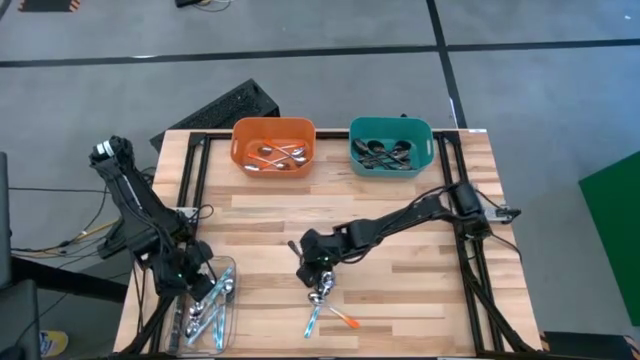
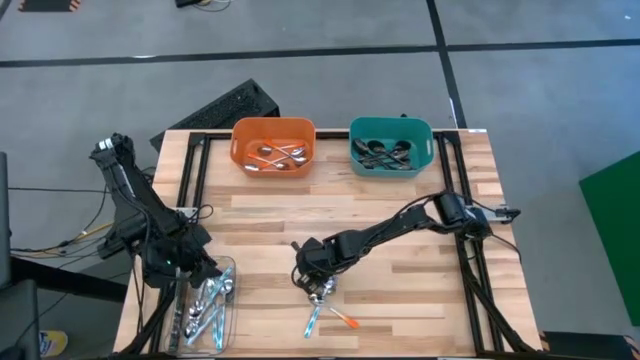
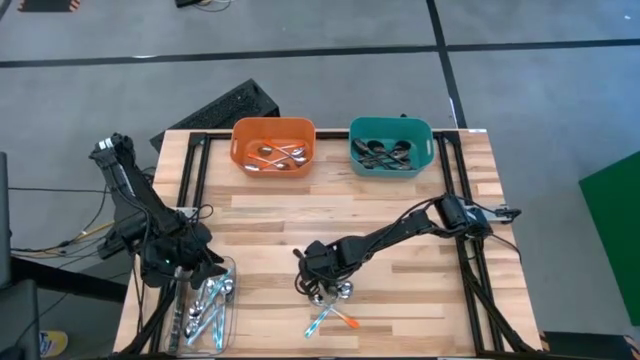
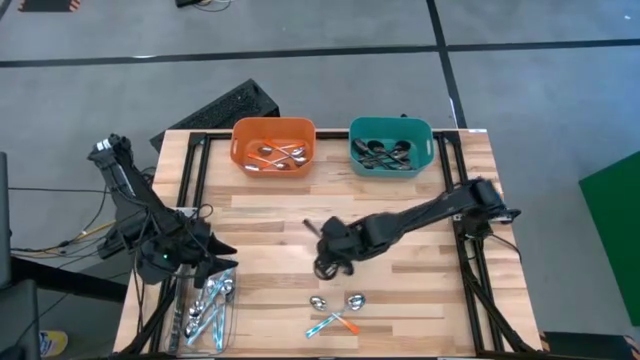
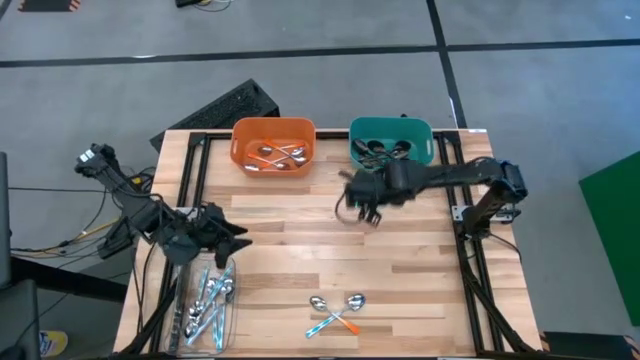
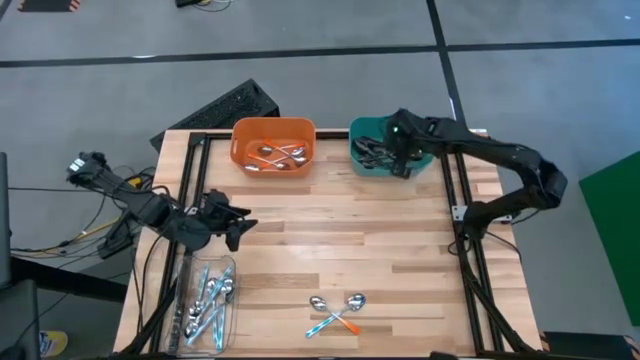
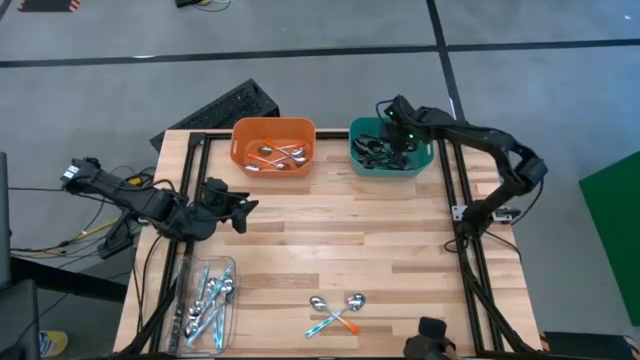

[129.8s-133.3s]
Task: Sort silverware by color (type)
Put the black spoon into the blue bin

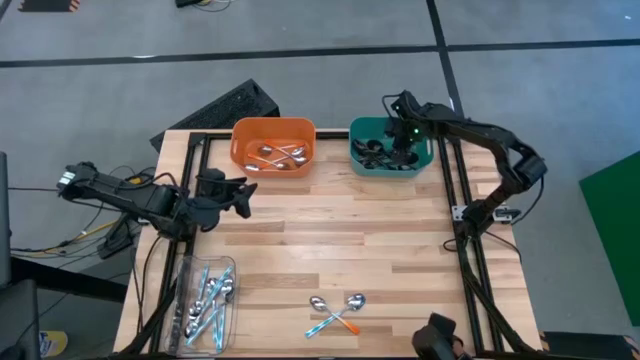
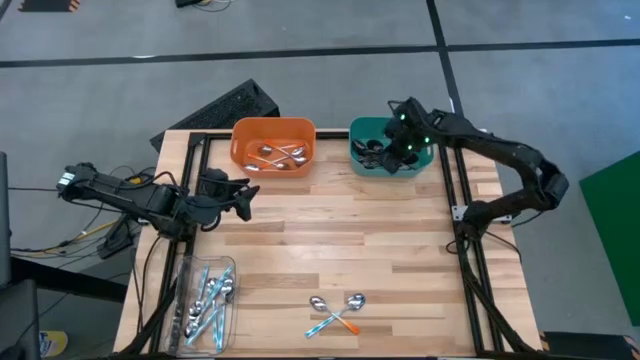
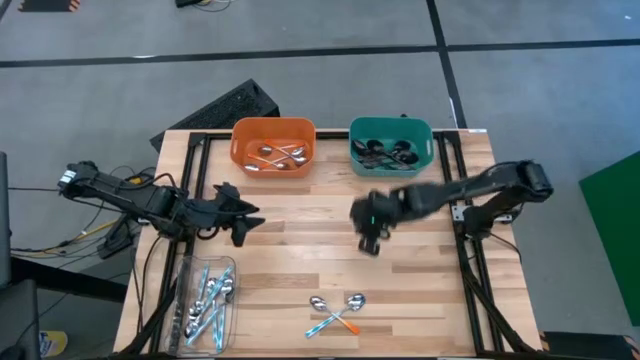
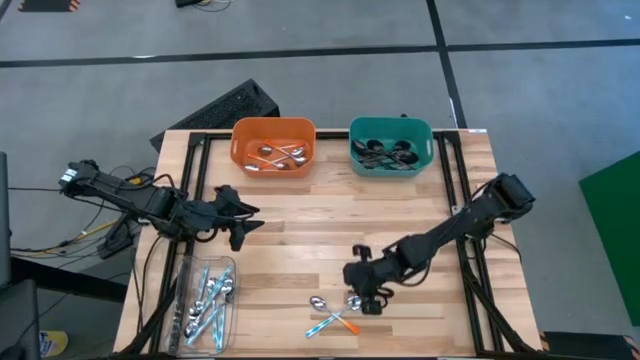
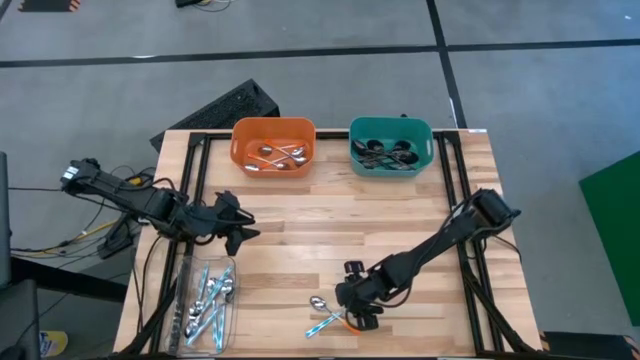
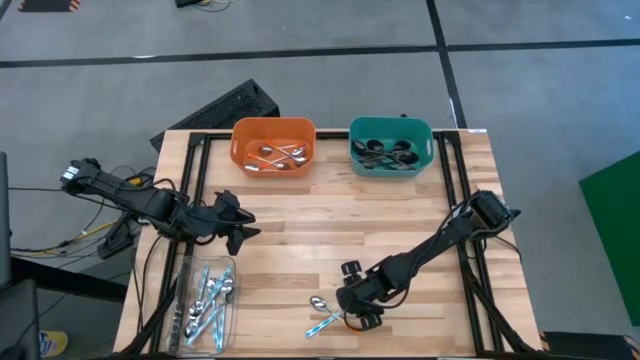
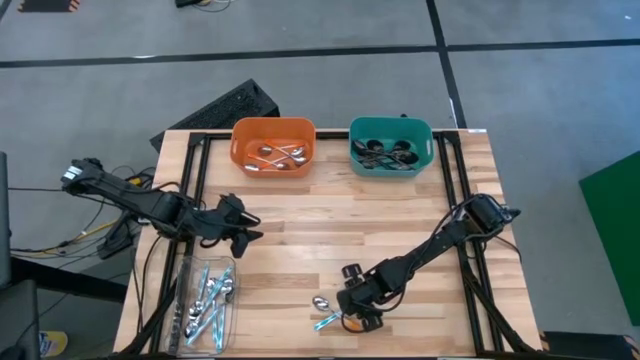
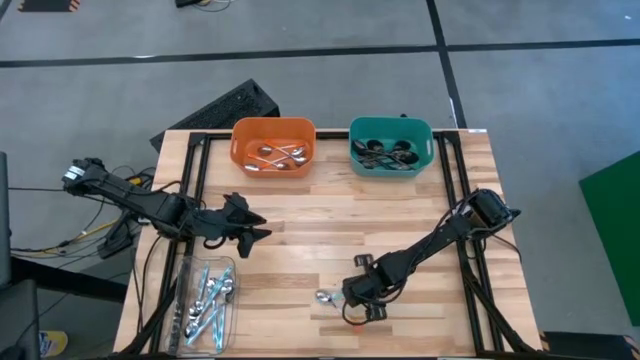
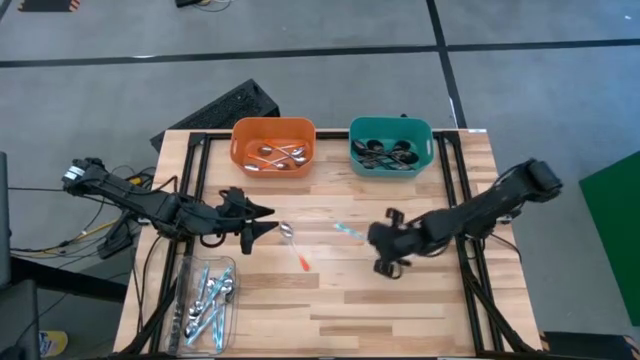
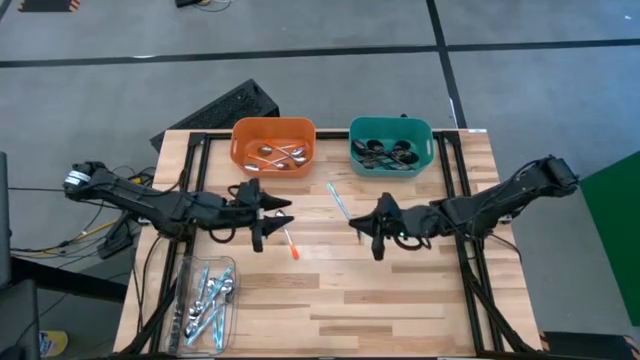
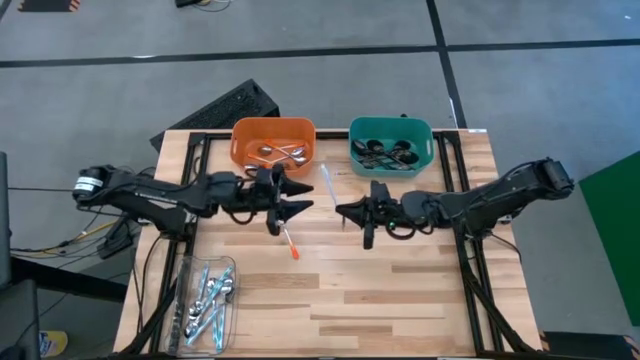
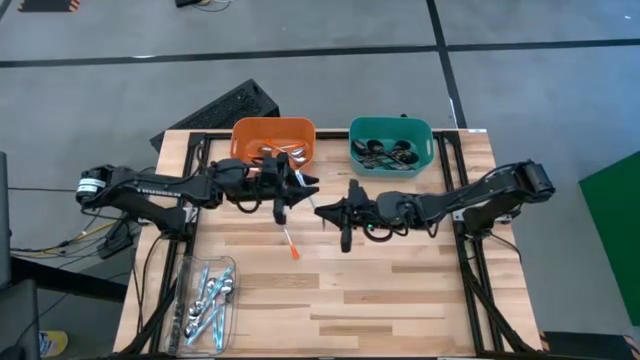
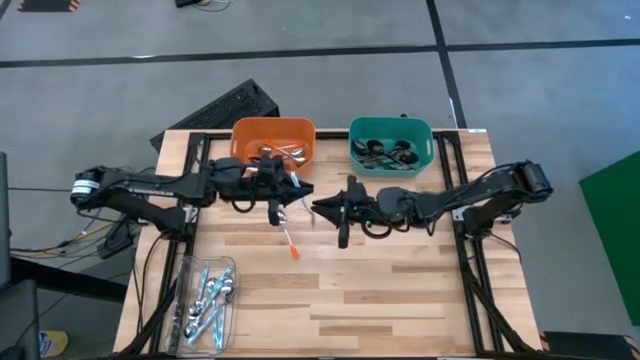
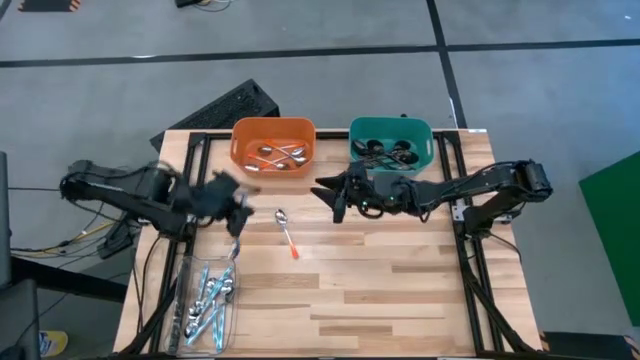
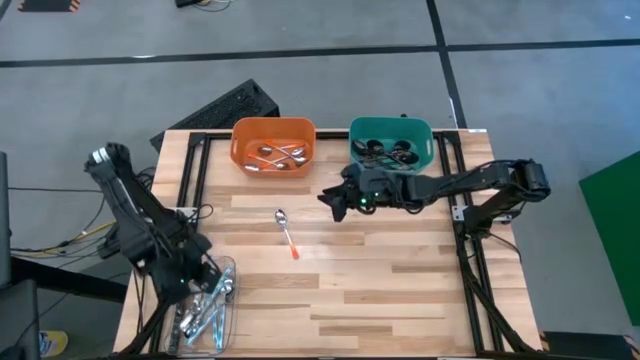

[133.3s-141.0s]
Put the green spoon into the transparent bin

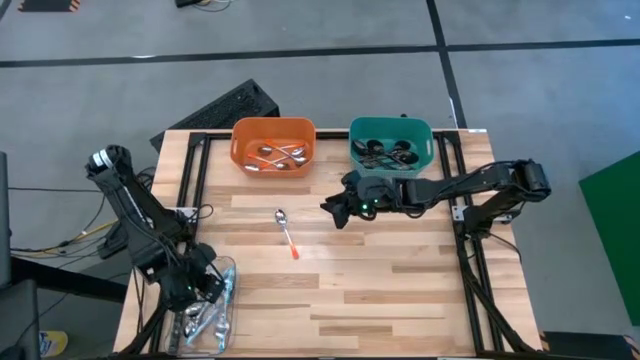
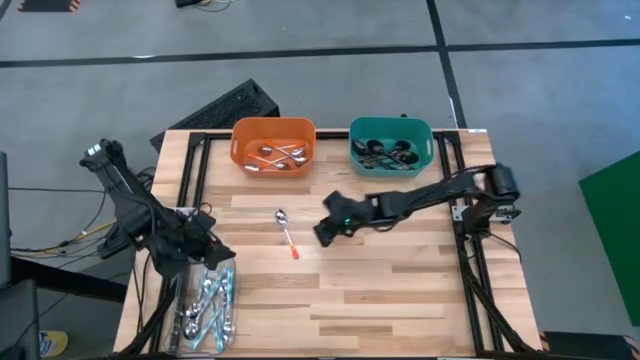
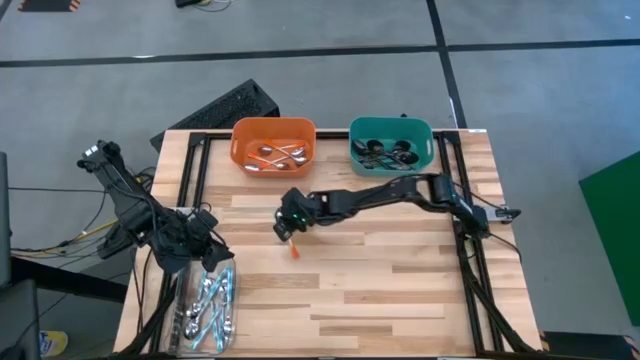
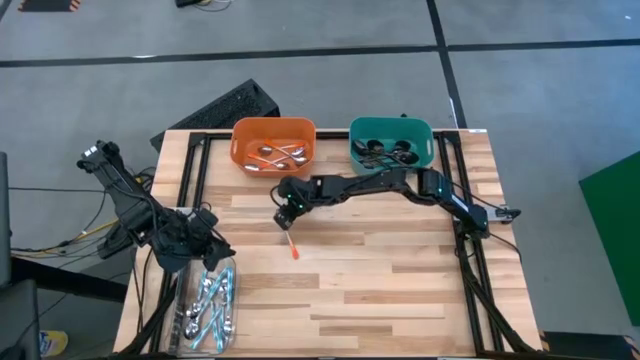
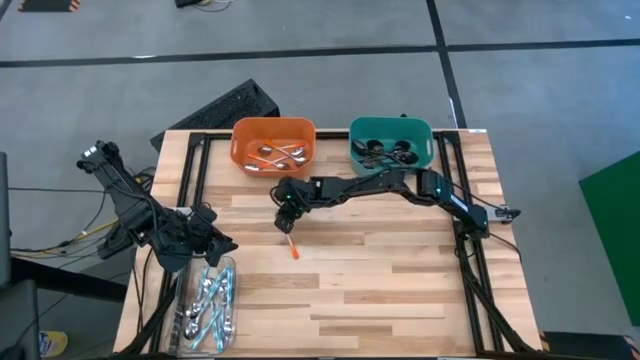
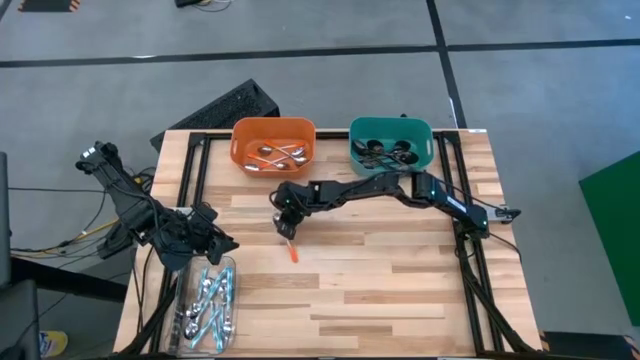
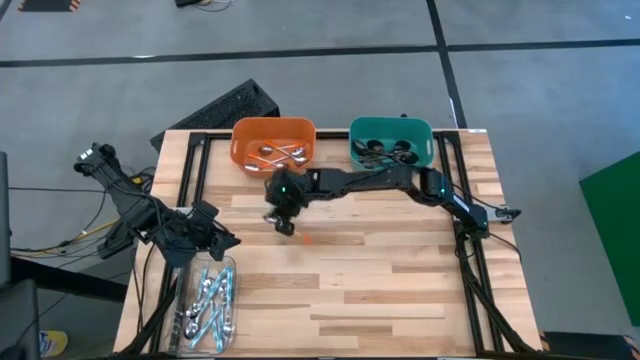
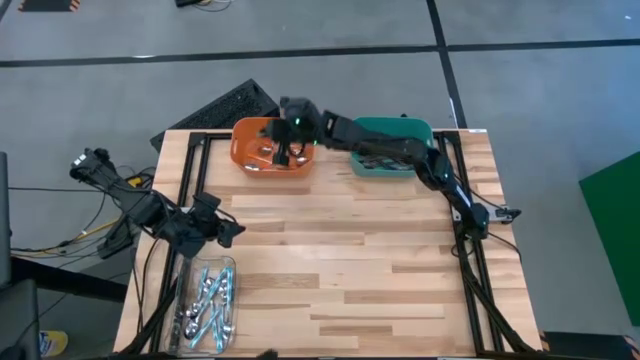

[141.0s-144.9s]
Put the orange spoon into the orange bin

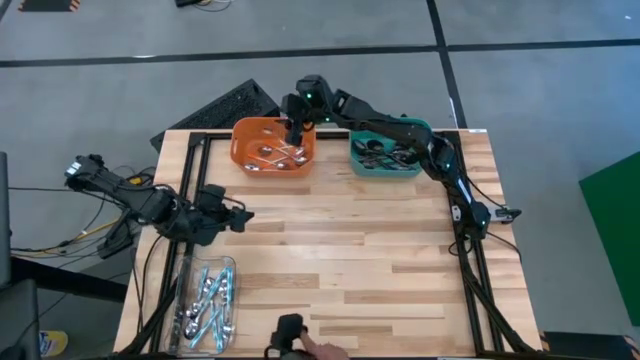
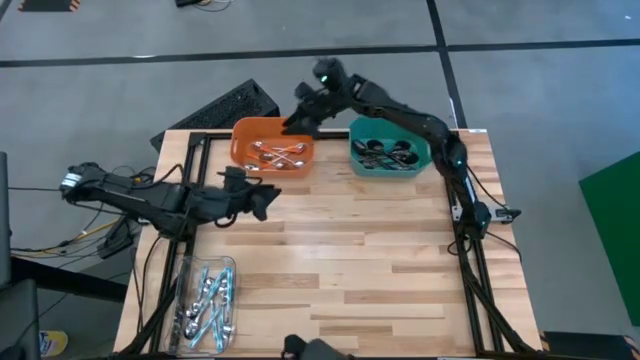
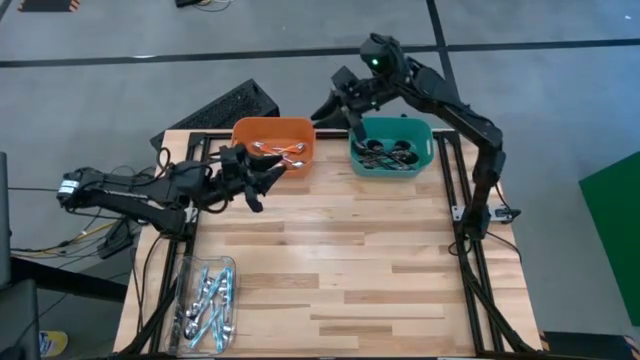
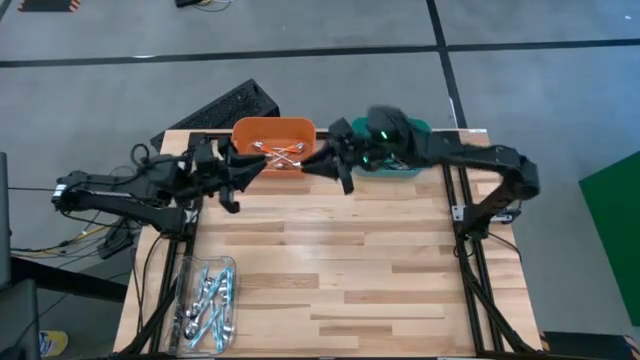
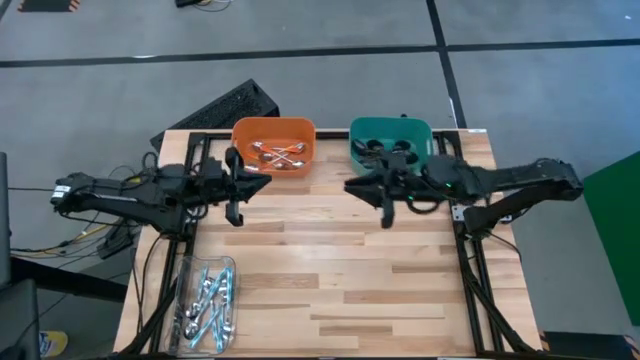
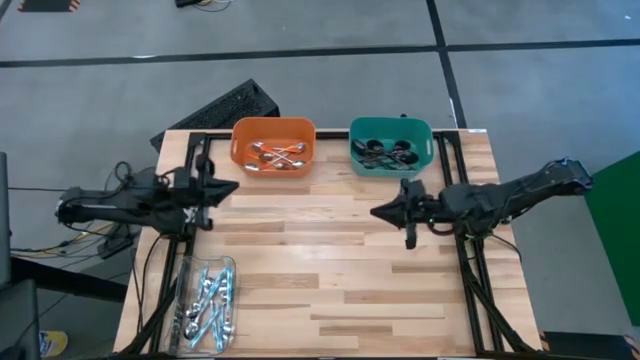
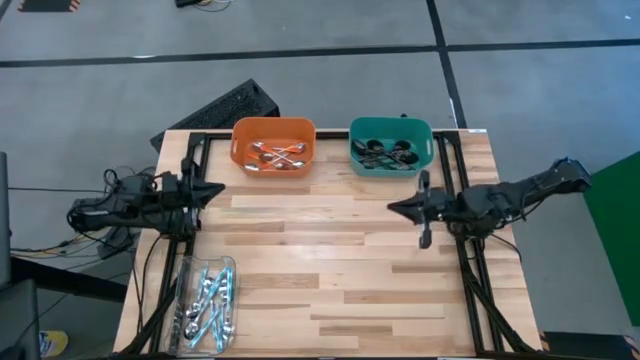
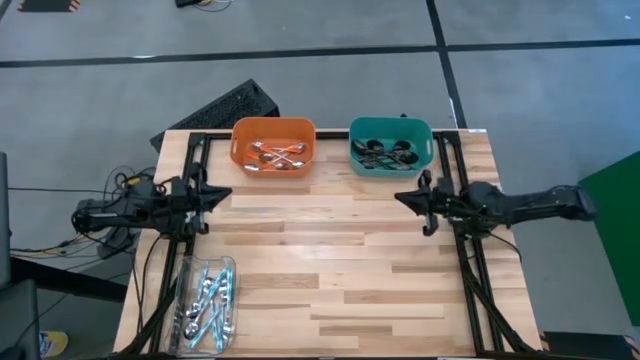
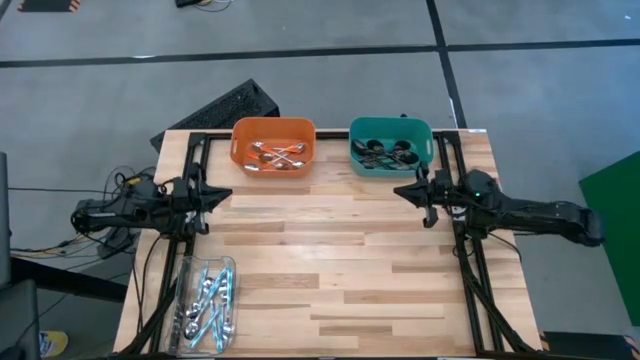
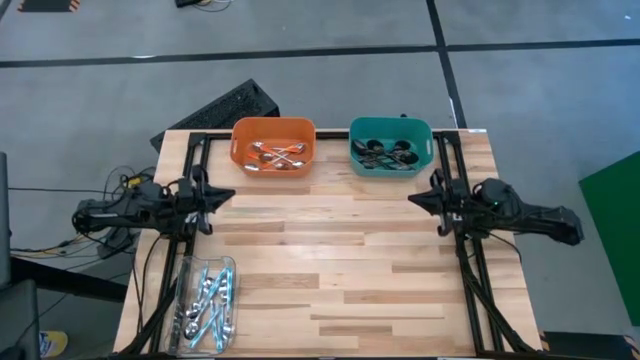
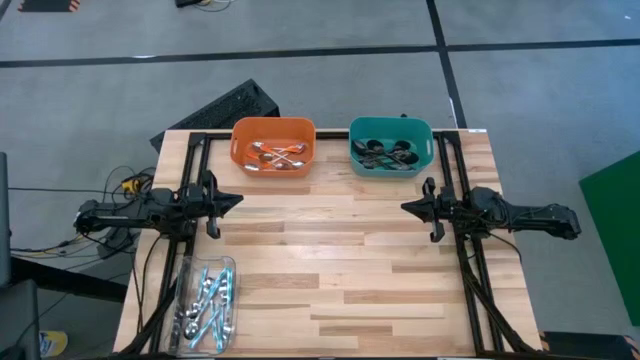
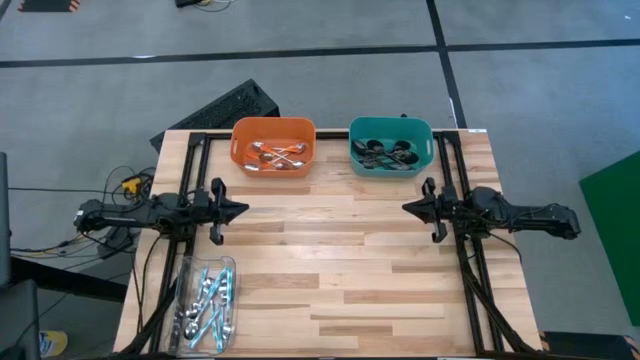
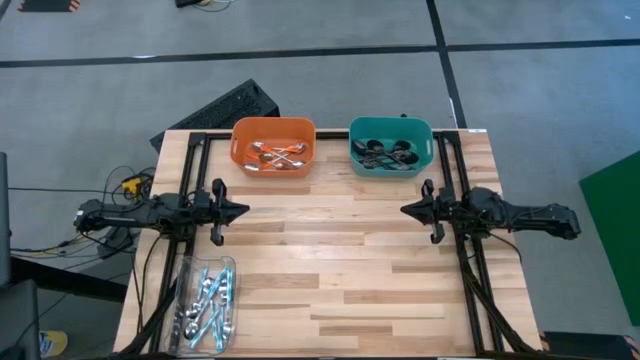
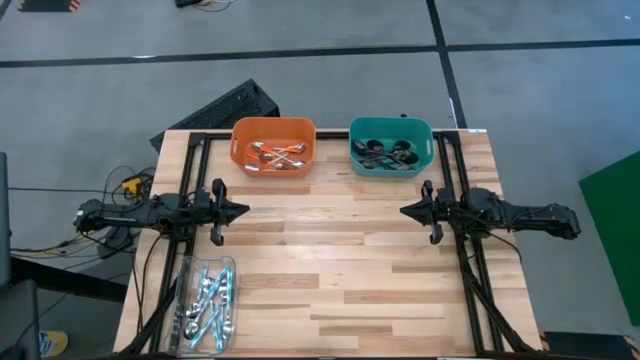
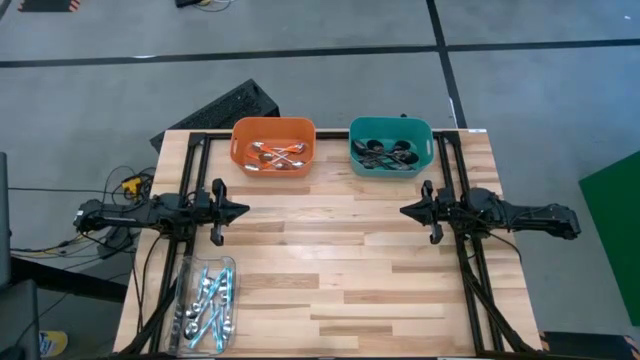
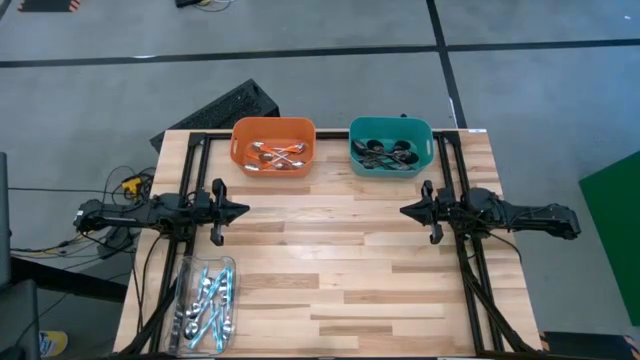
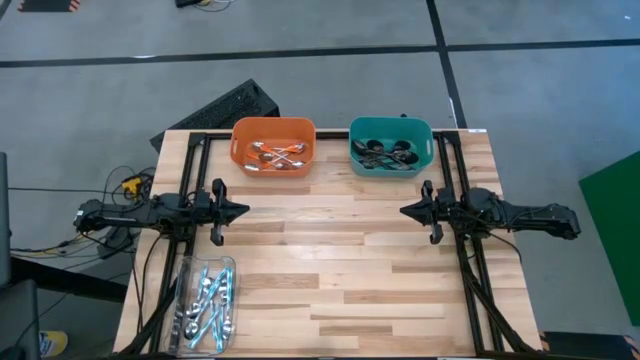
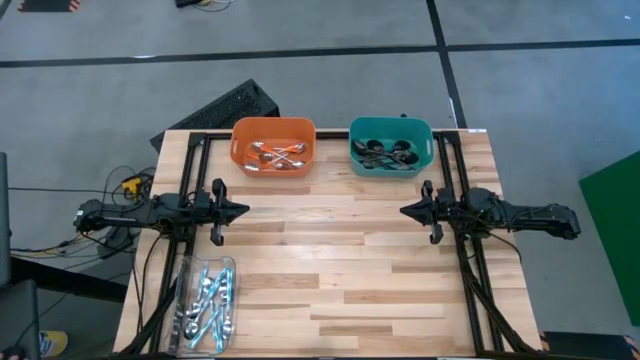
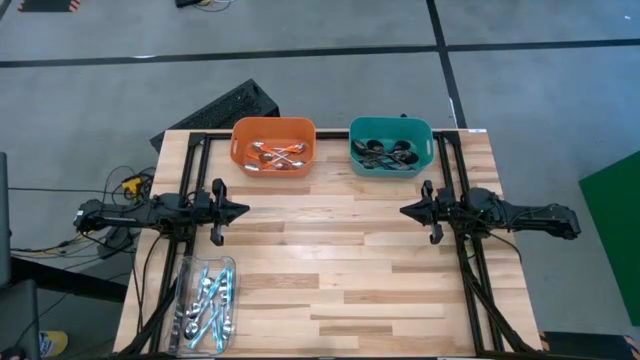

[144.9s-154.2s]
Return to Home Position
